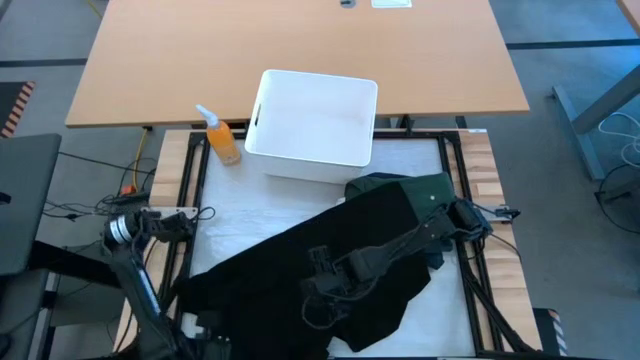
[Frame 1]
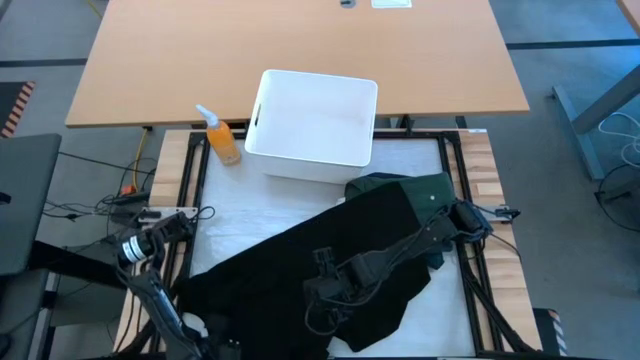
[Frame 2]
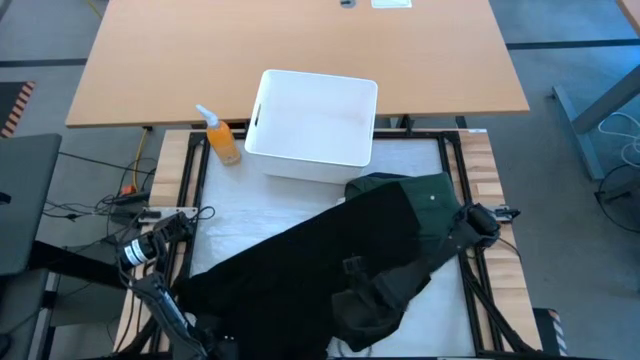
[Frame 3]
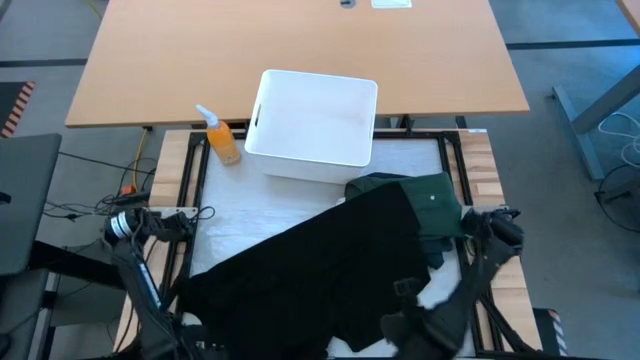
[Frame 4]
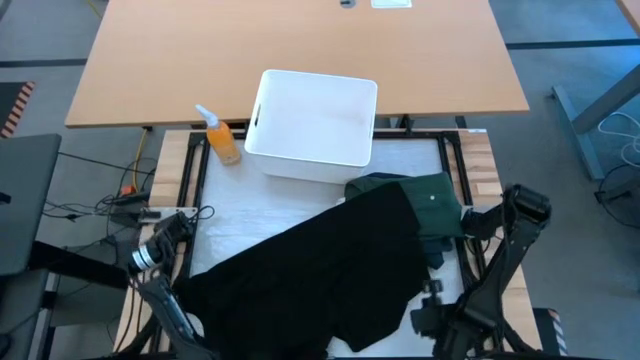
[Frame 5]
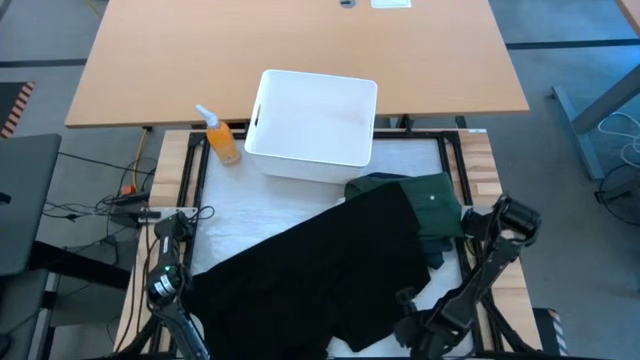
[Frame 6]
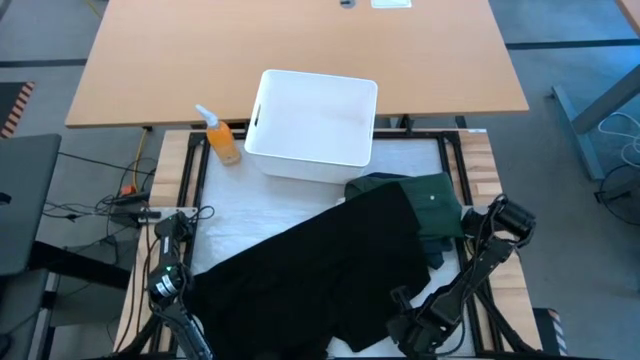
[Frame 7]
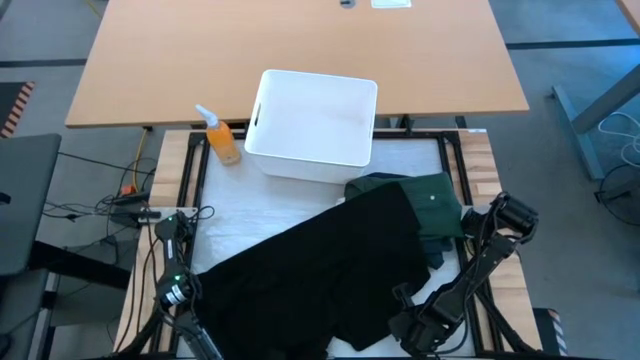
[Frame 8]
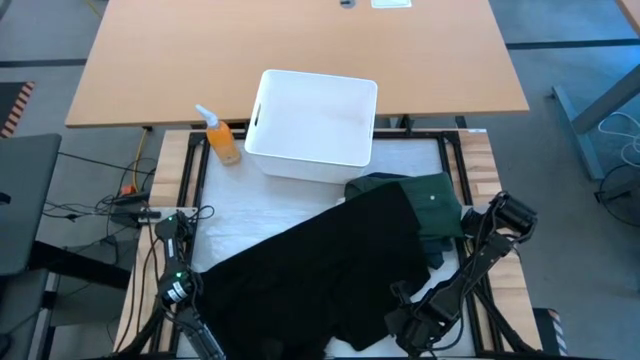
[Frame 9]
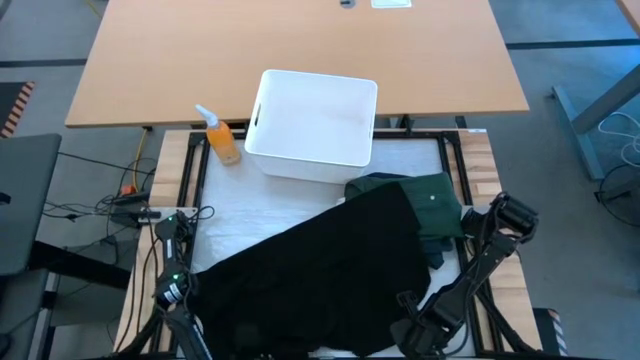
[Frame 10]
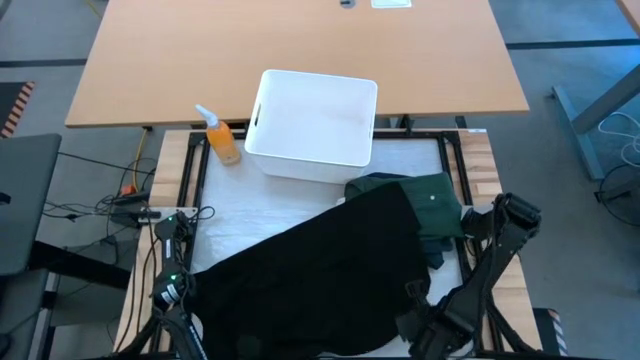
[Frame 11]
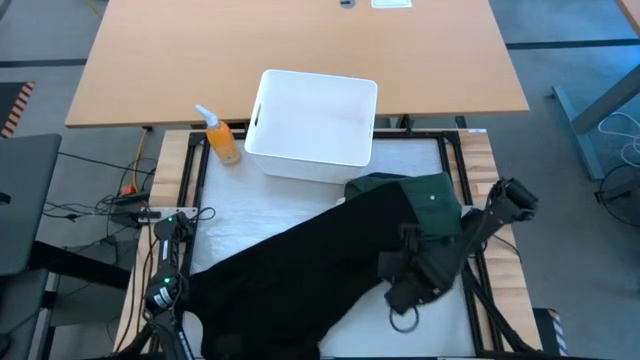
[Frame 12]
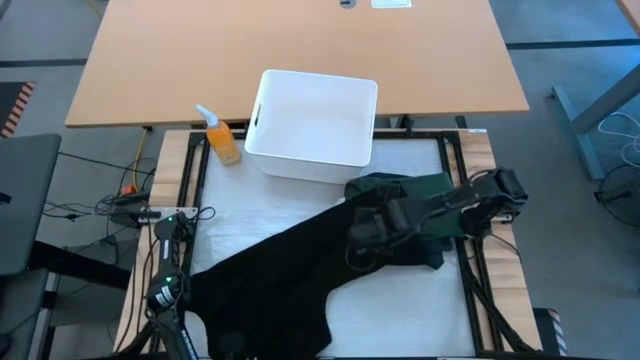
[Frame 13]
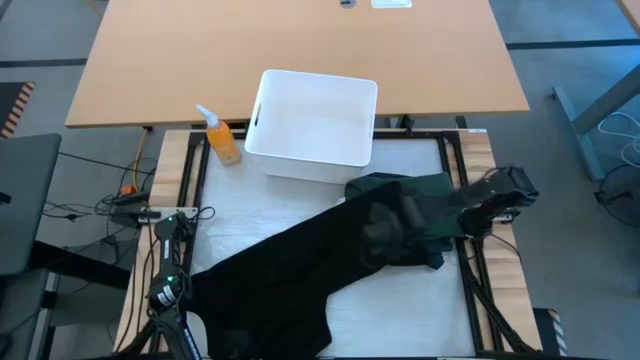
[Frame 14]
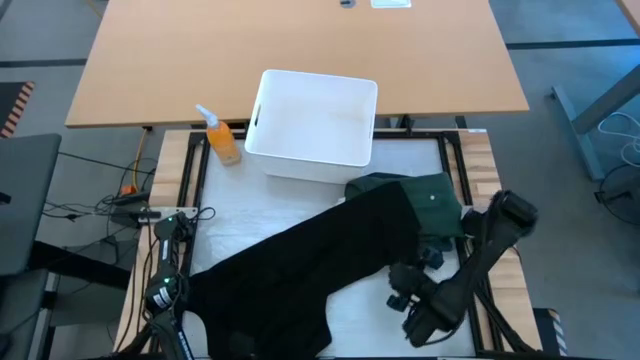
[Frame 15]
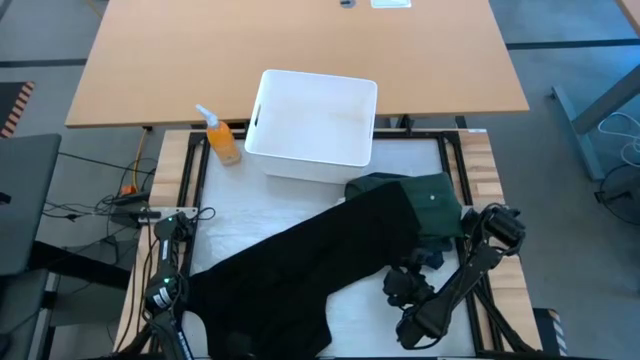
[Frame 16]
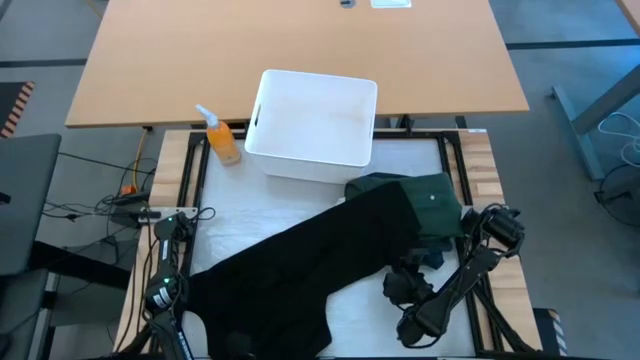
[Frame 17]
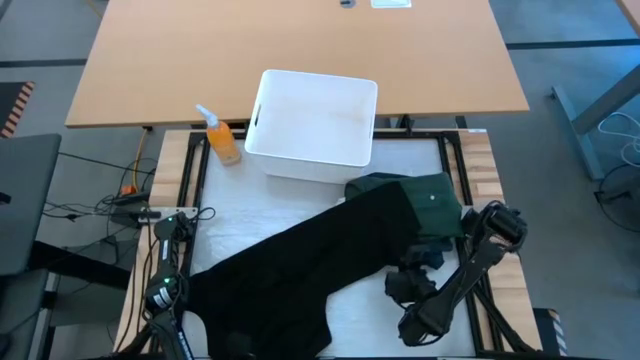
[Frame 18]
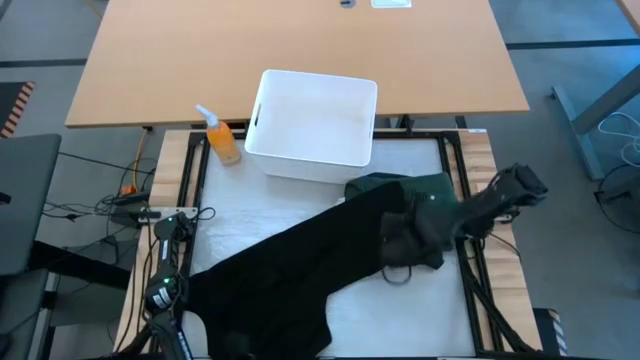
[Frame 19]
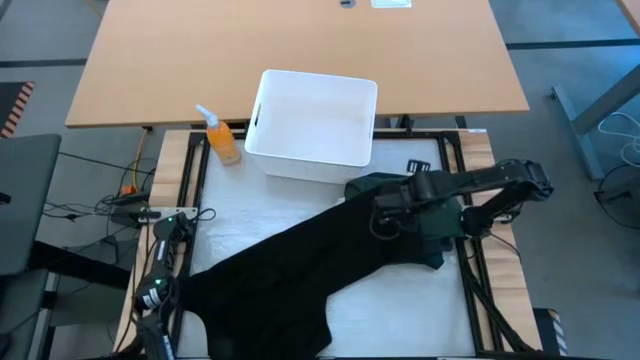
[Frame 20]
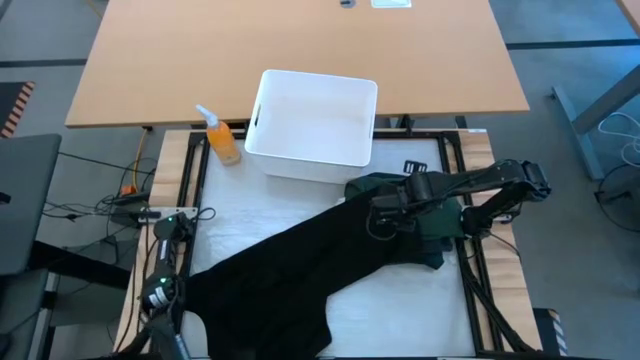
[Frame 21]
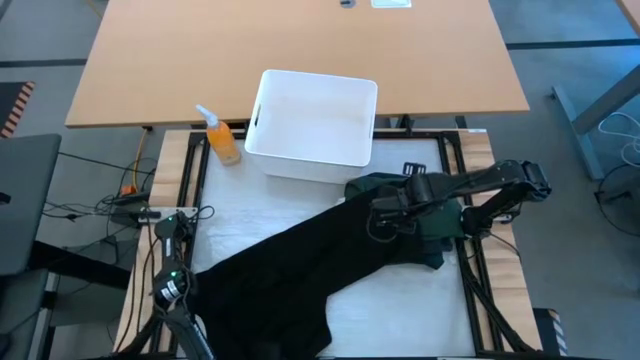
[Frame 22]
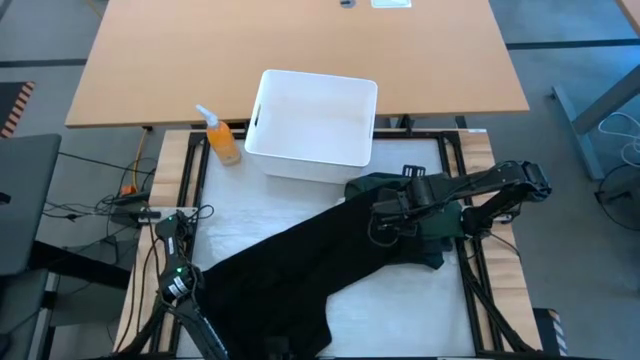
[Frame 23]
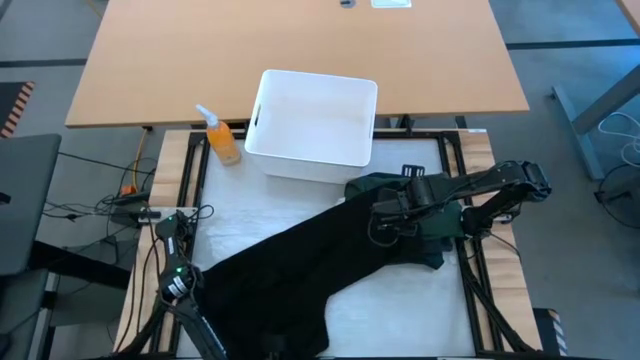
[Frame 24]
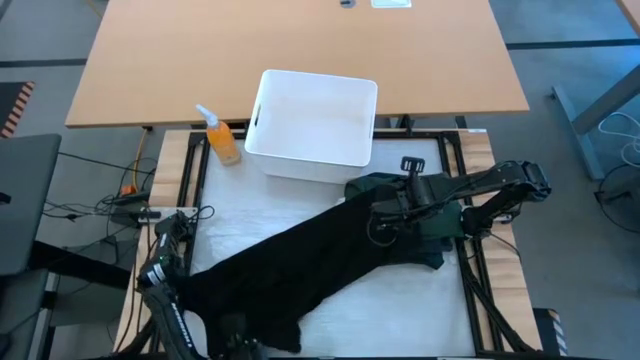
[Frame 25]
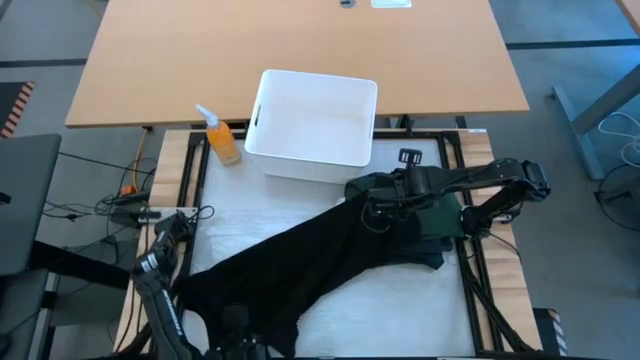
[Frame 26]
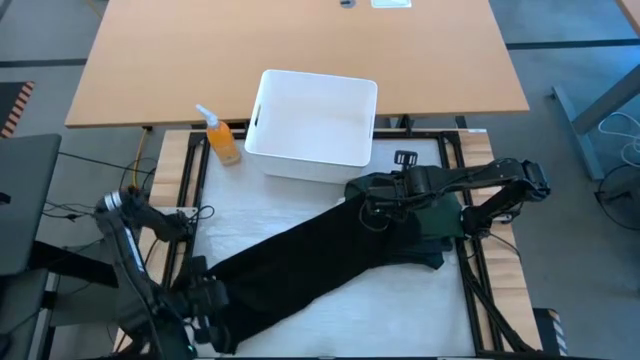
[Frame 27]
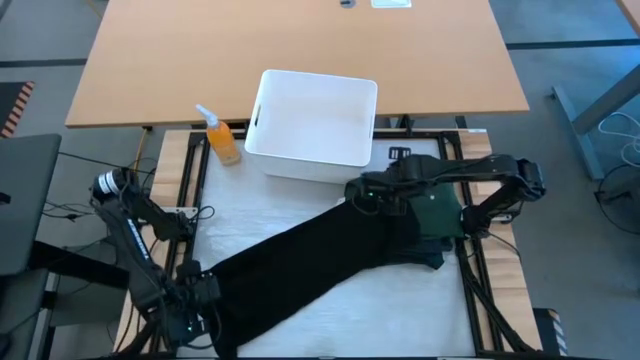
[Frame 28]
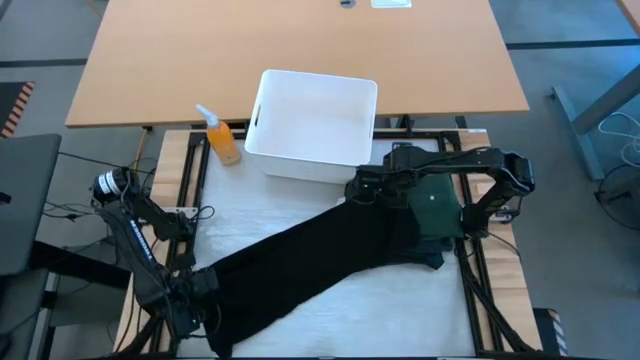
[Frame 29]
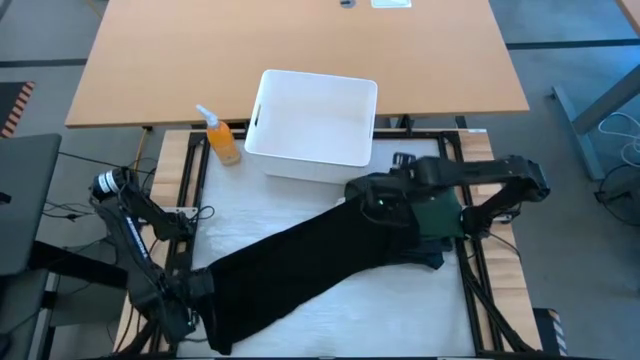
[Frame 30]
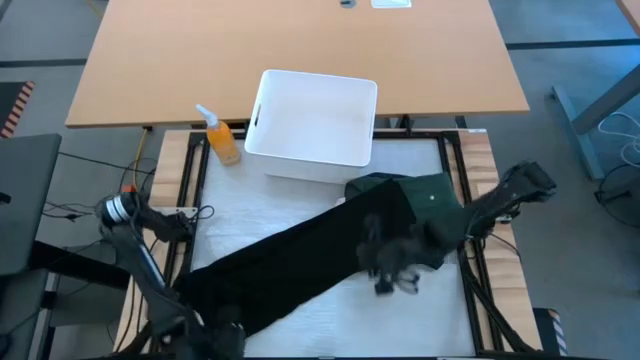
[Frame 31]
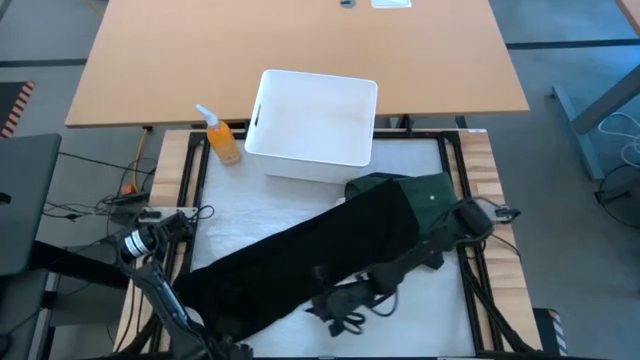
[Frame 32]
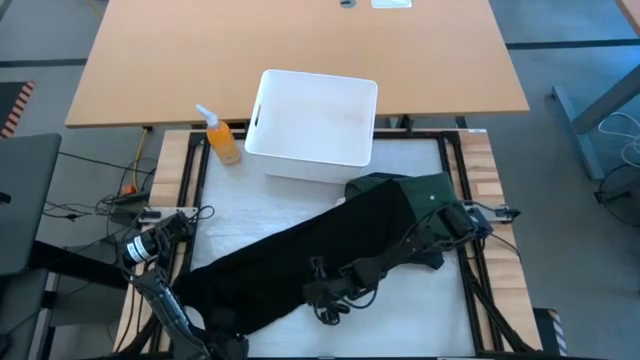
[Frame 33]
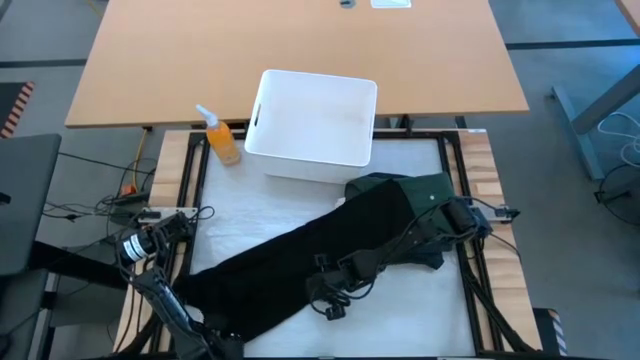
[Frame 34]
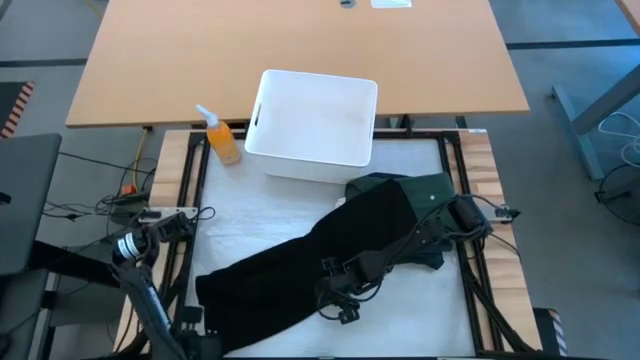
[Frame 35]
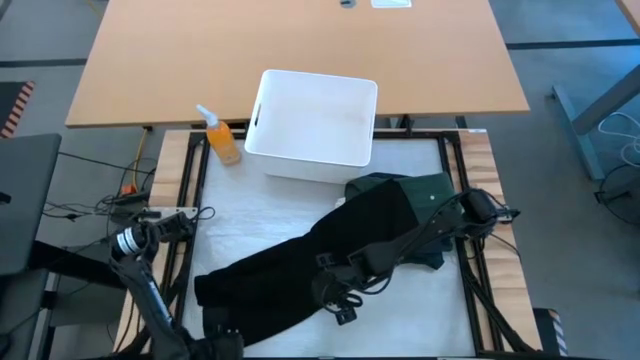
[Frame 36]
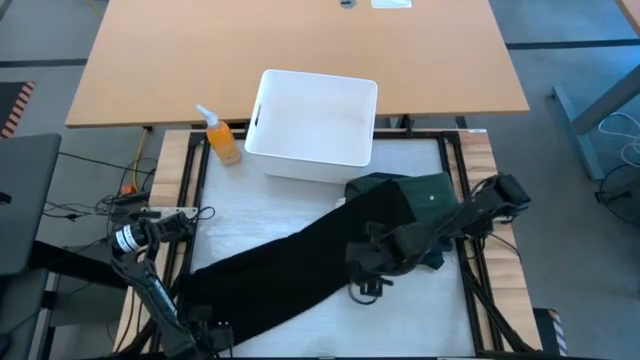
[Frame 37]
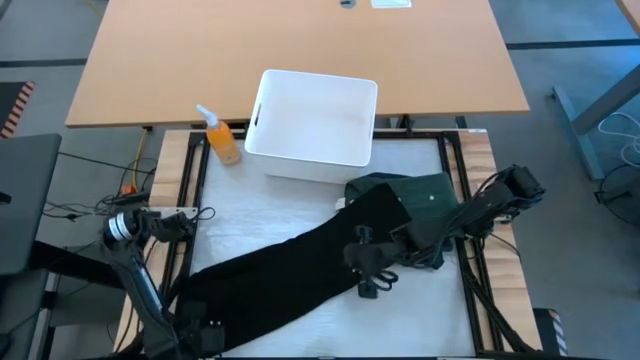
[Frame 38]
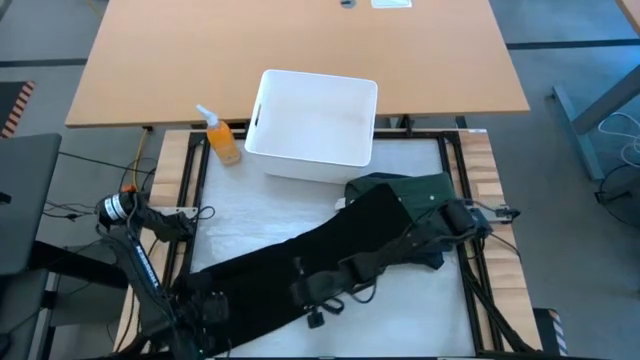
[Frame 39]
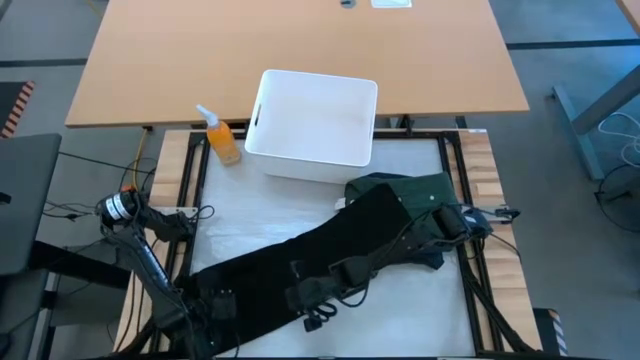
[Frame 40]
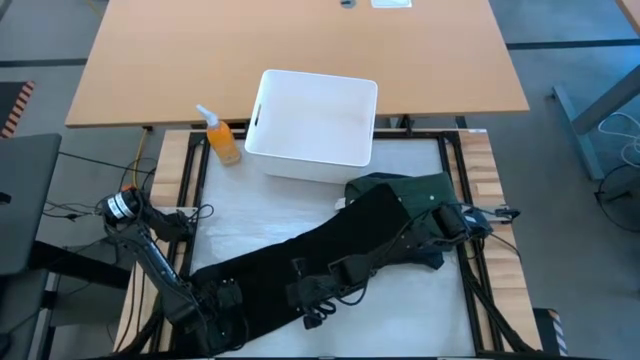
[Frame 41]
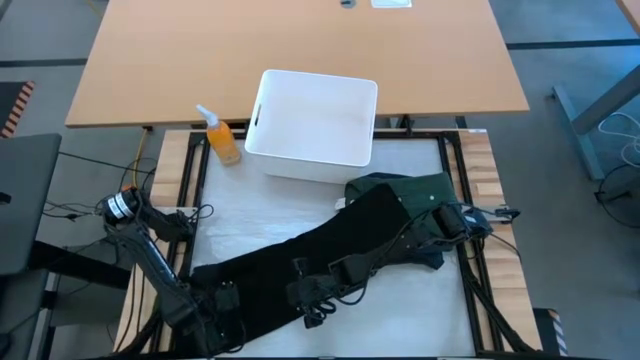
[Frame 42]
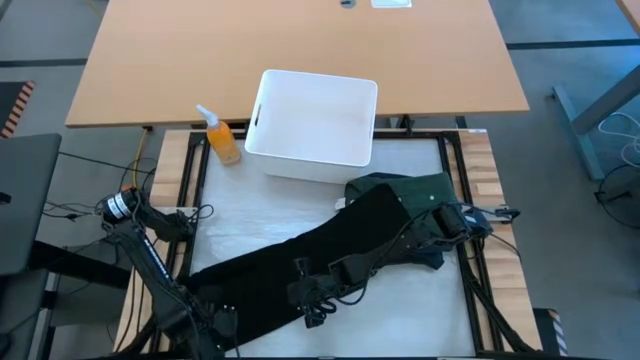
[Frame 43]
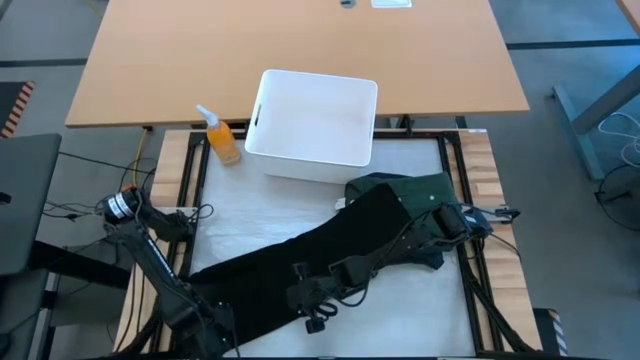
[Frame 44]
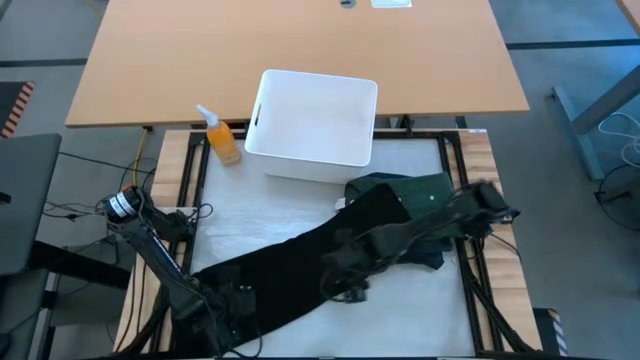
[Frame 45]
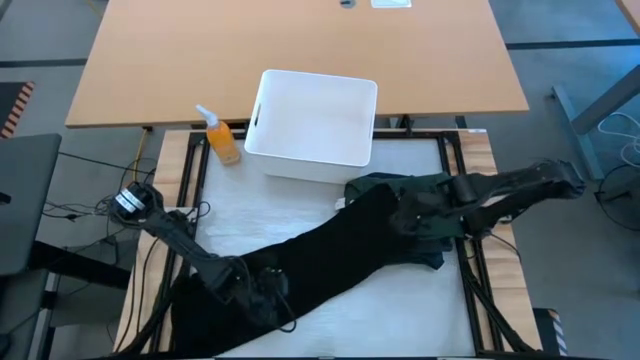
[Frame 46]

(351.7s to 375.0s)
Task: Fold laundry
Fold the black shirt from the white laundry organizer
